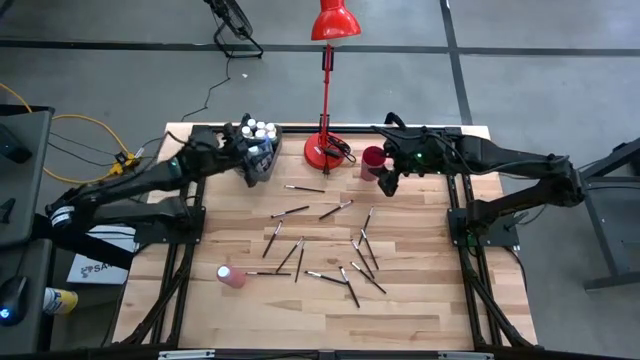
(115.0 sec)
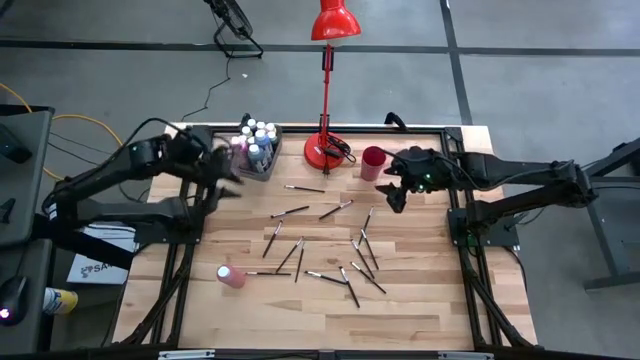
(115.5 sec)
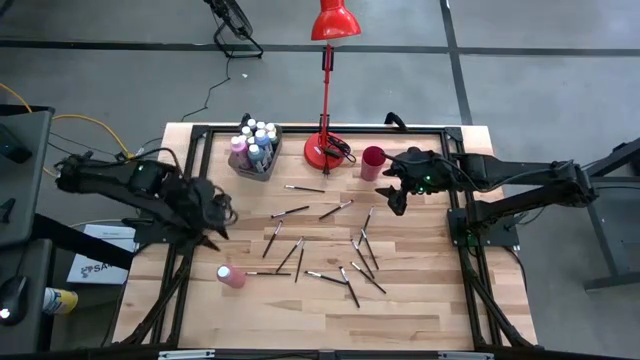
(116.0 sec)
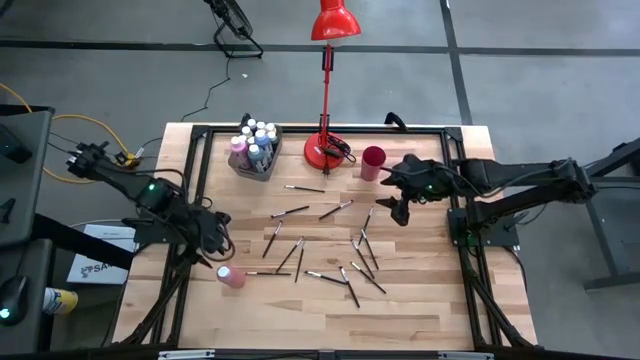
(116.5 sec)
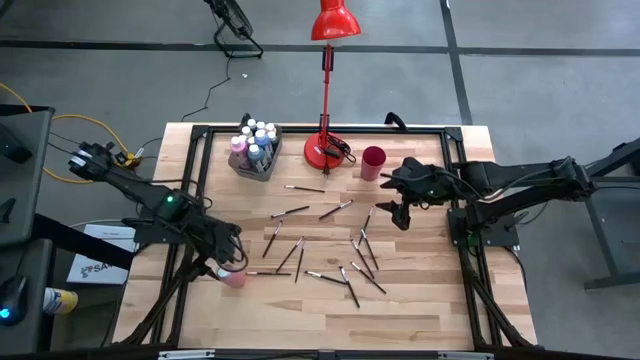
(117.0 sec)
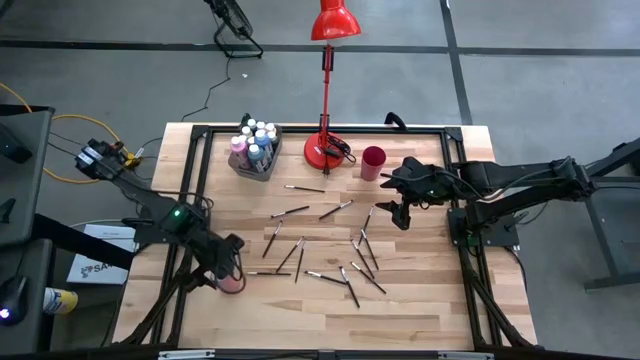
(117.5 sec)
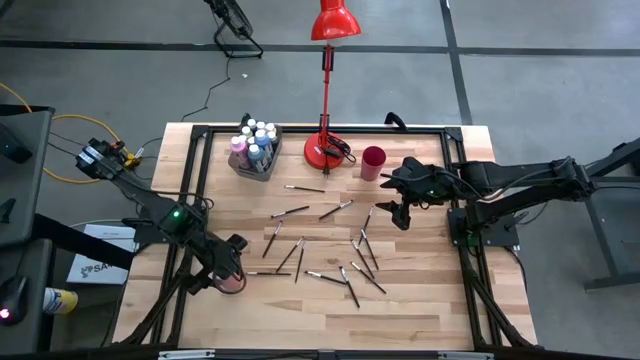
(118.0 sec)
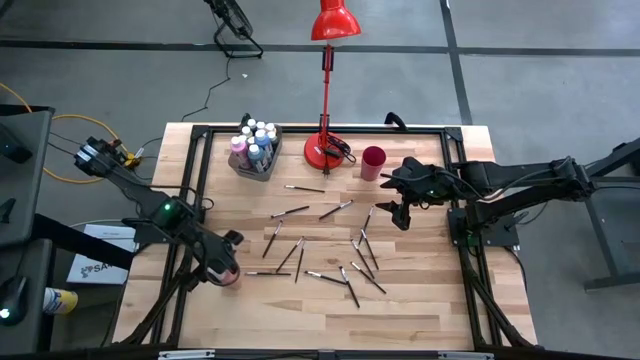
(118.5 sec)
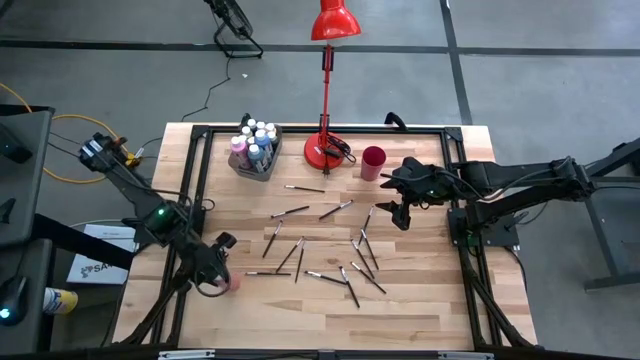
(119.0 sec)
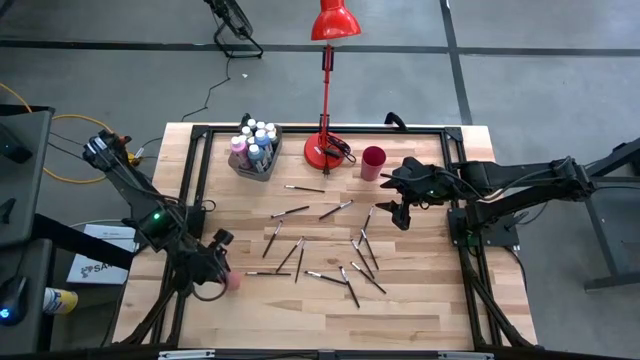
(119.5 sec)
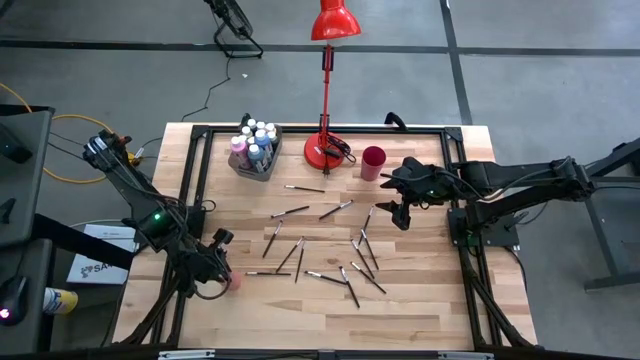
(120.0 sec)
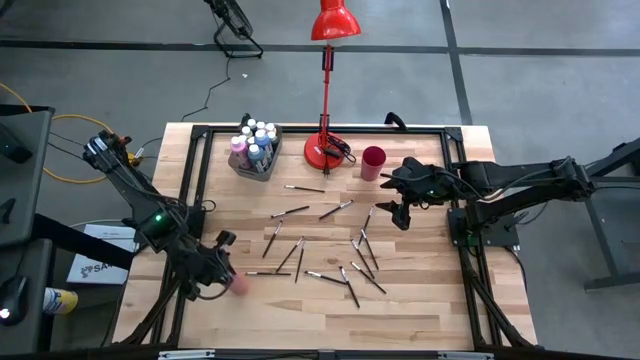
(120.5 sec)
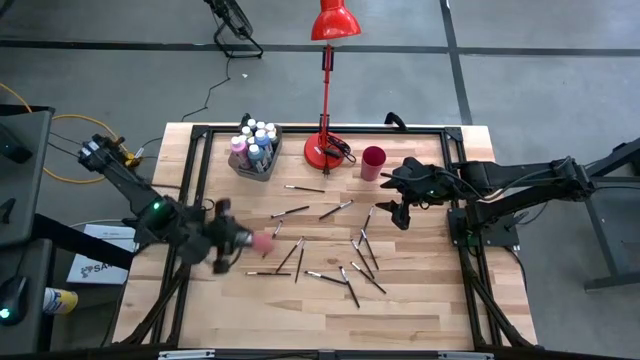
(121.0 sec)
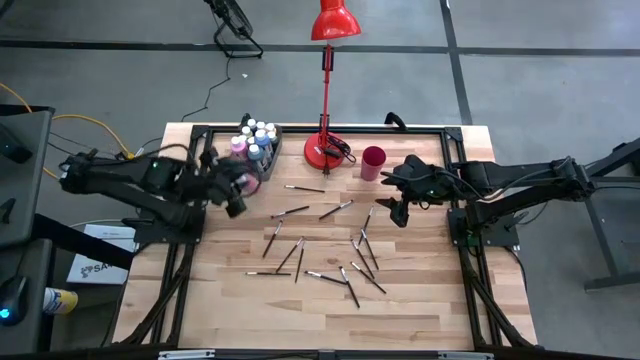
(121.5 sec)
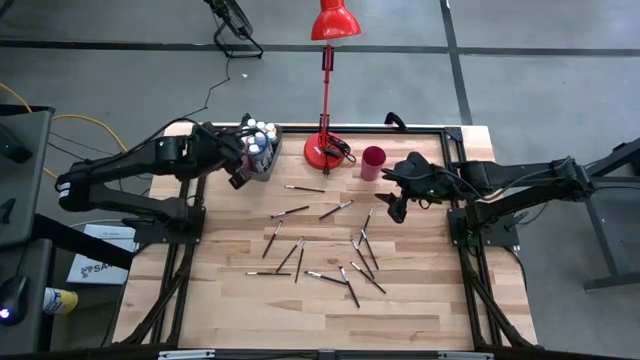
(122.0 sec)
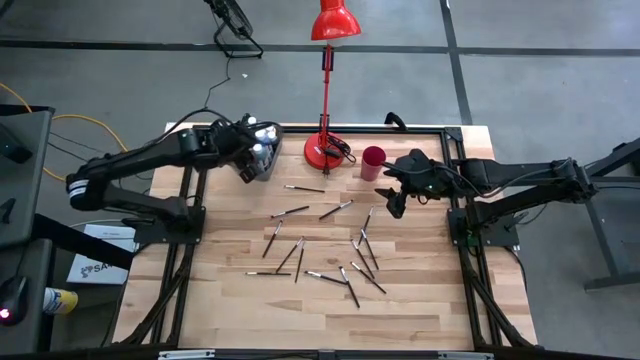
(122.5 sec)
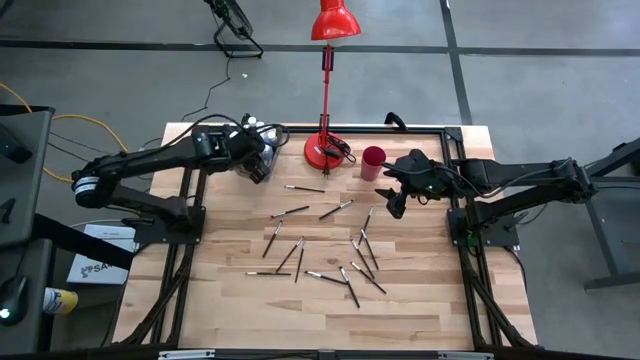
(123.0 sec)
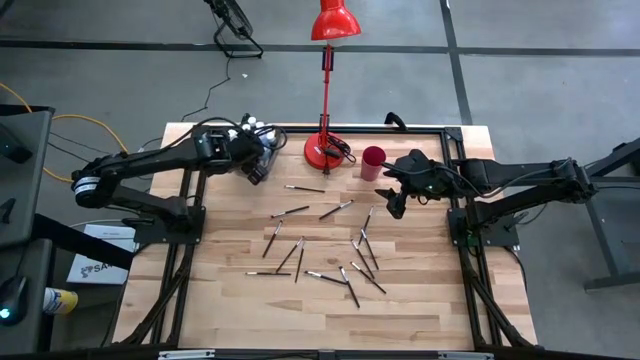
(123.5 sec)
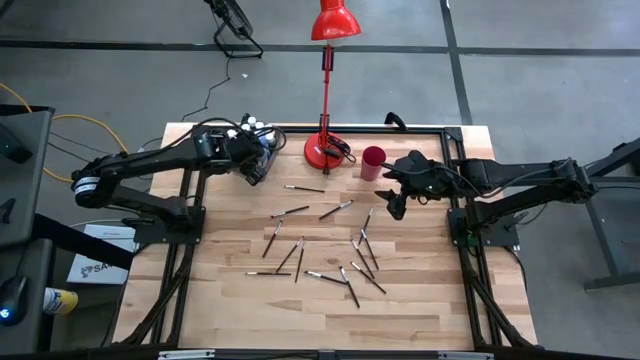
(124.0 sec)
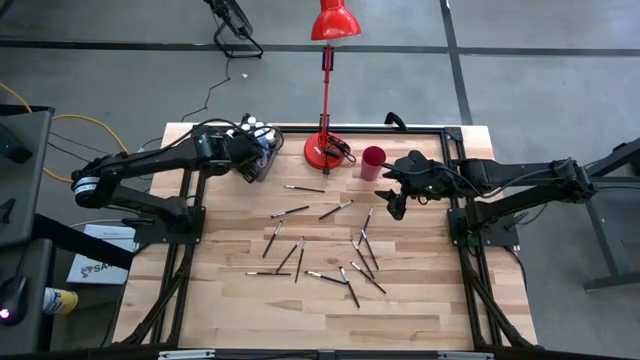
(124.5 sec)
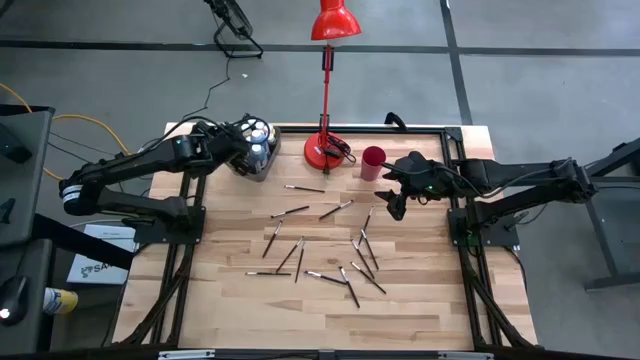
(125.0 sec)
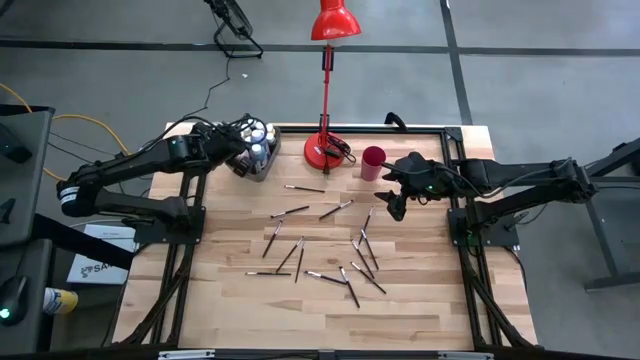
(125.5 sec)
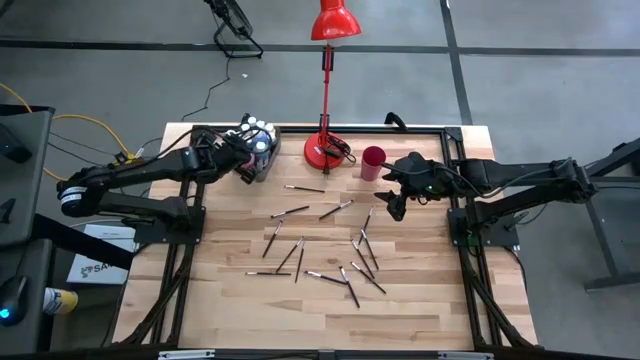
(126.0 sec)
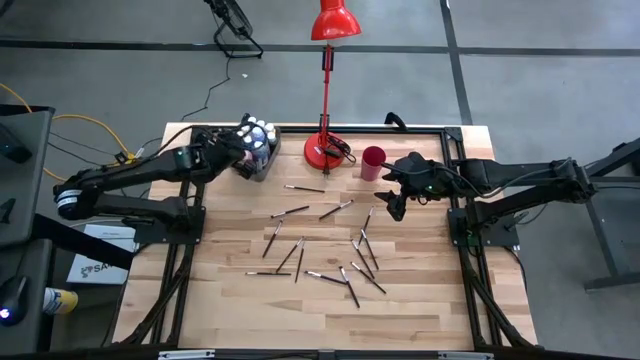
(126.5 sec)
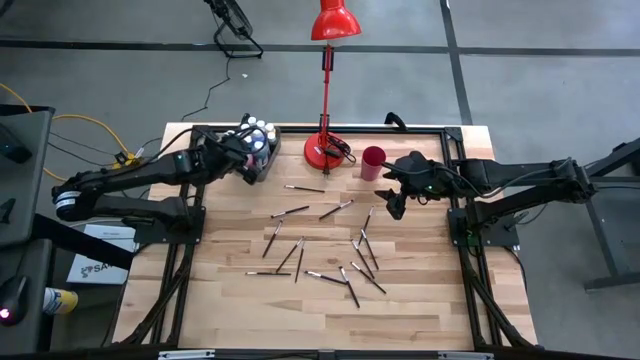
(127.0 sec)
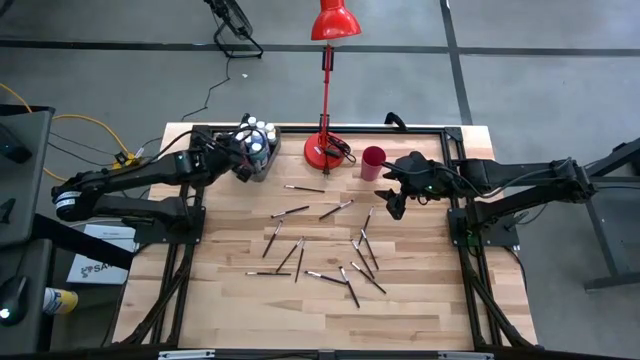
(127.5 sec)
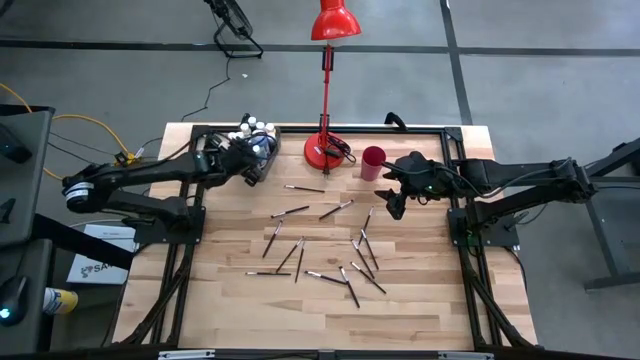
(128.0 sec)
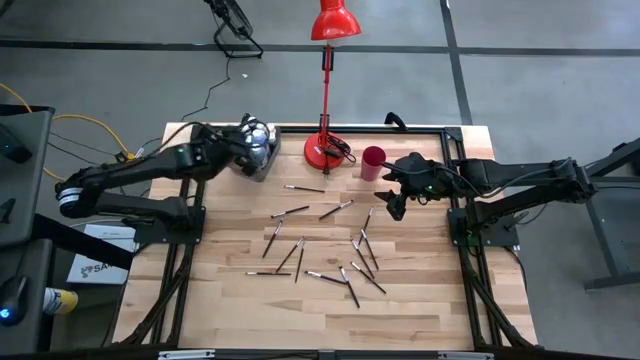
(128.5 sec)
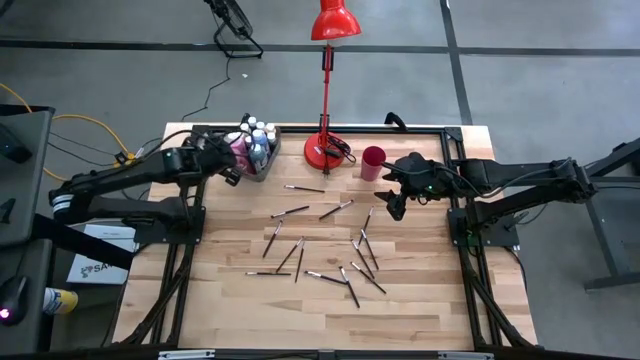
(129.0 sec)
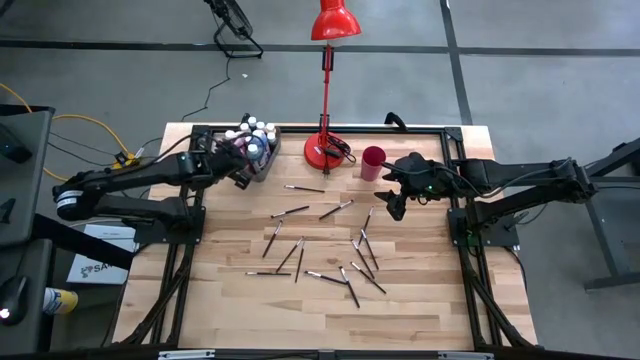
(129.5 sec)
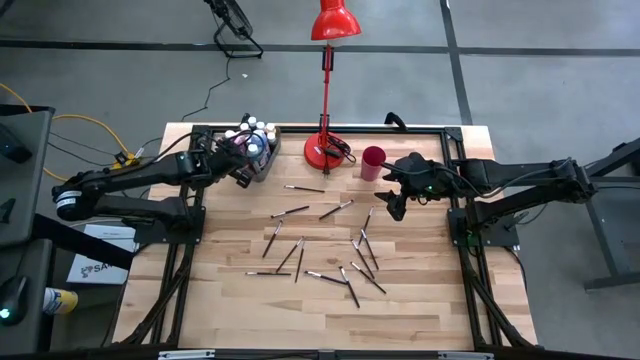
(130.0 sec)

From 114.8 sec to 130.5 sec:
Task: Pick & Place Paint Supplies
Put the large pink paint bottle into the bin

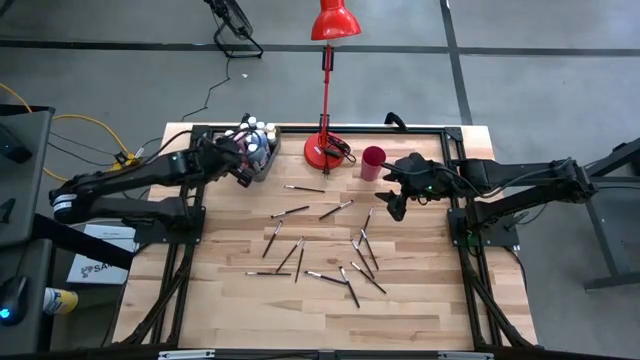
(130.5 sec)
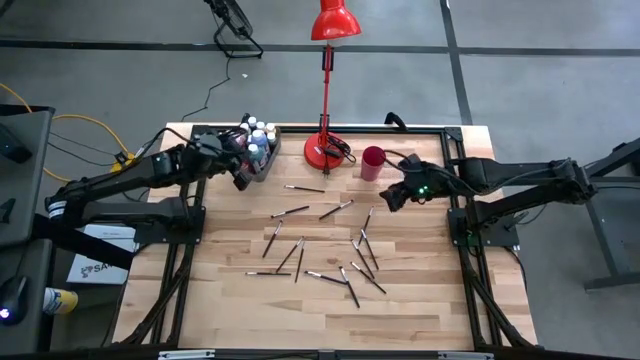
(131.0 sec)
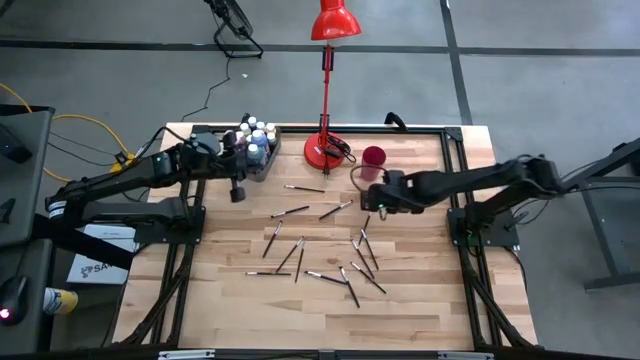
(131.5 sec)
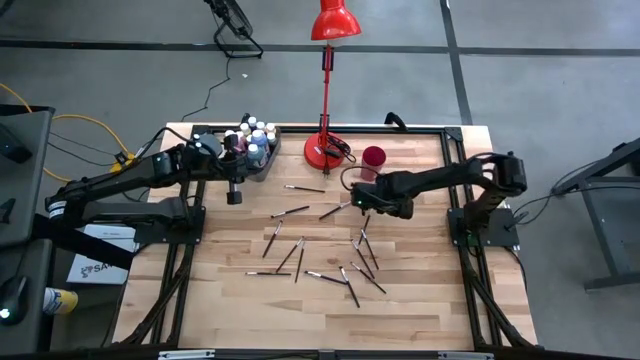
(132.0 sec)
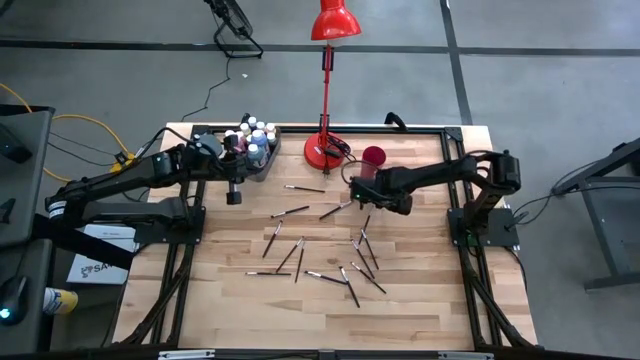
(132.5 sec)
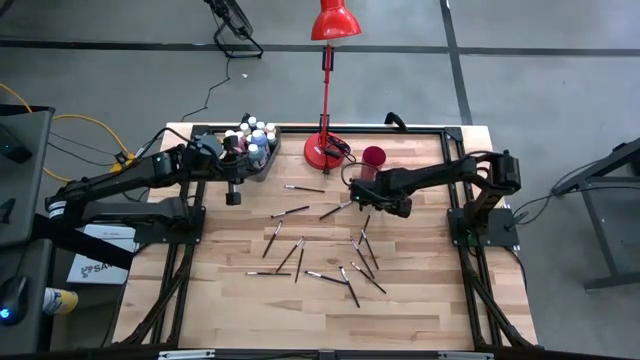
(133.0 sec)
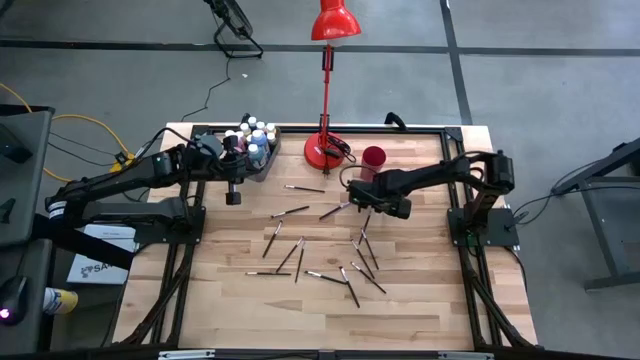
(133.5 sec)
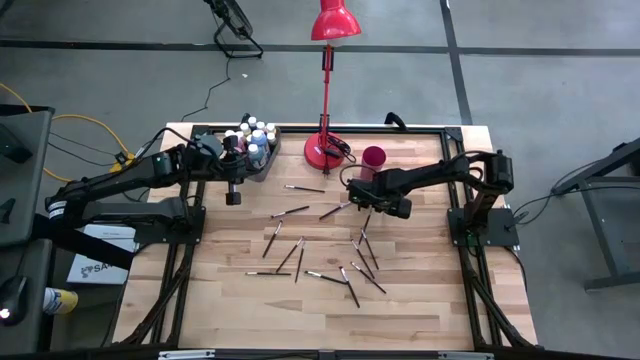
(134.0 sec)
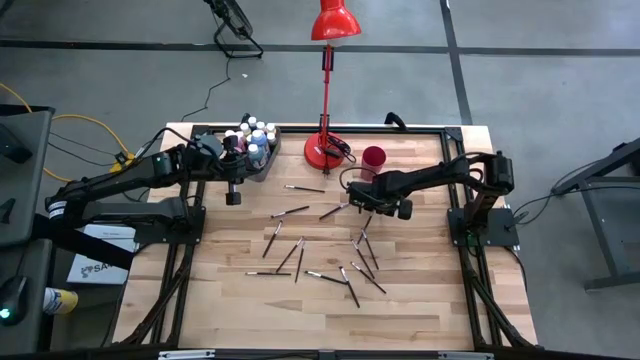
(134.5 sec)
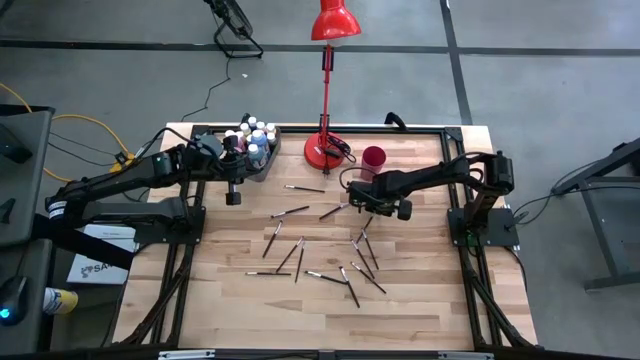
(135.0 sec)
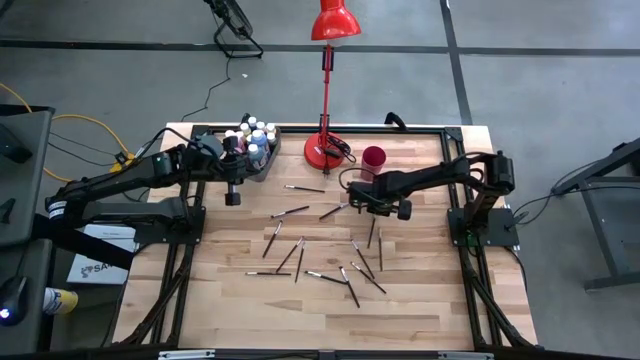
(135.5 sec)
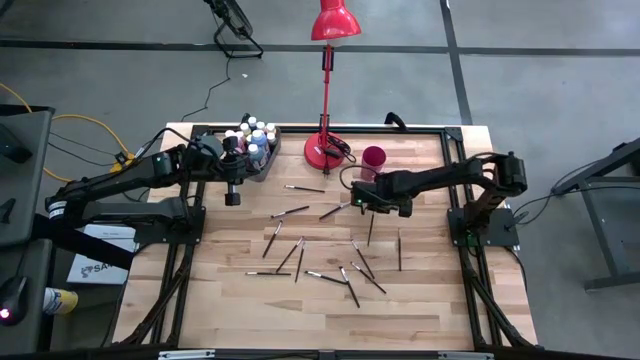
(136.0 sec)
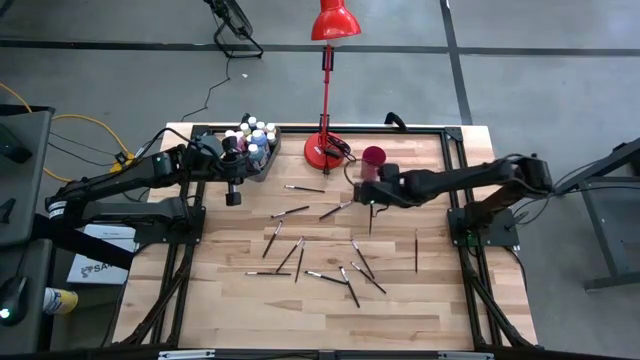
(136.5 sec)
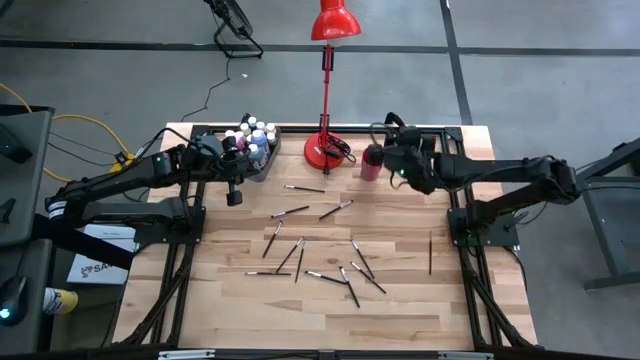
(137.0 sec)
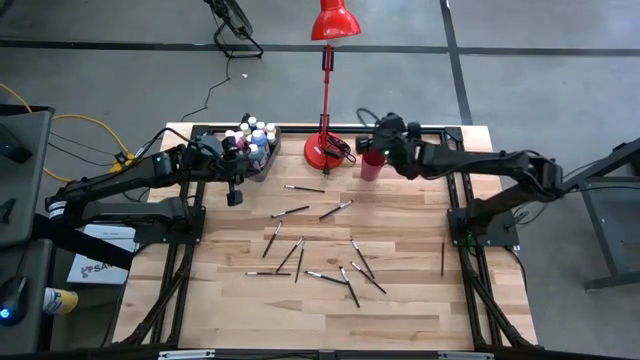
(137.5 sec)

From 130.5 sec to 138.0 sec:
Put the paint brush into the cup
